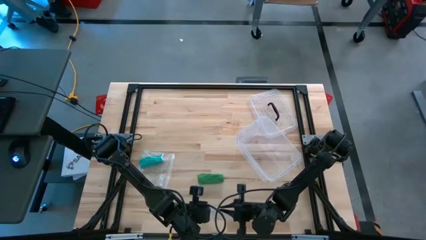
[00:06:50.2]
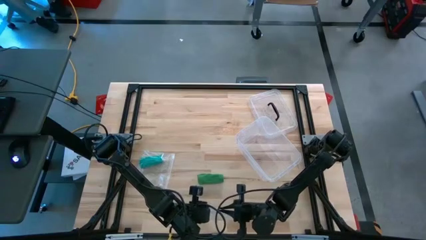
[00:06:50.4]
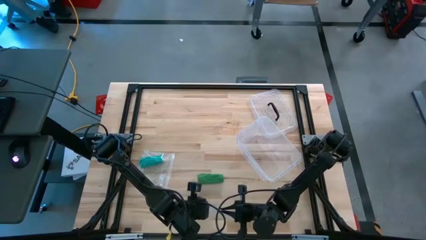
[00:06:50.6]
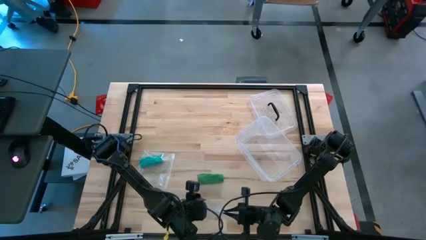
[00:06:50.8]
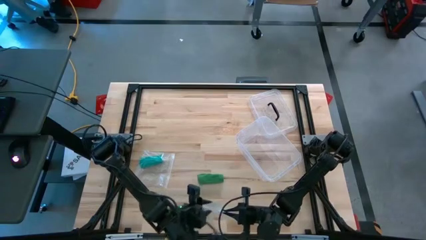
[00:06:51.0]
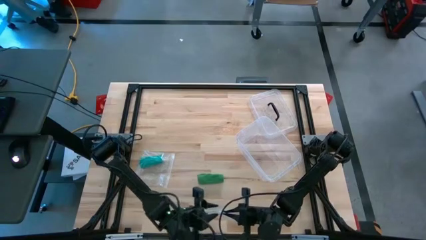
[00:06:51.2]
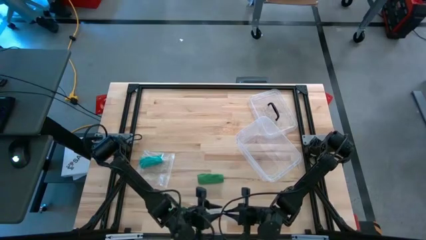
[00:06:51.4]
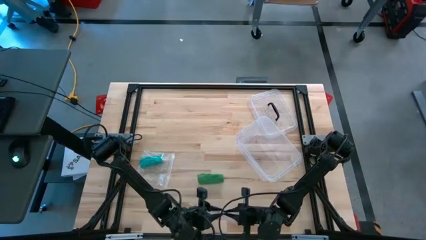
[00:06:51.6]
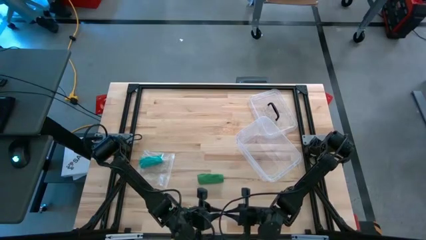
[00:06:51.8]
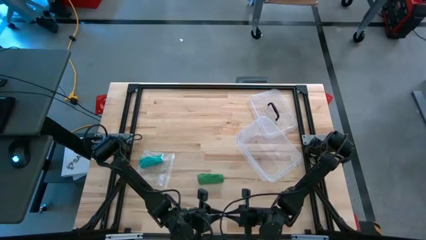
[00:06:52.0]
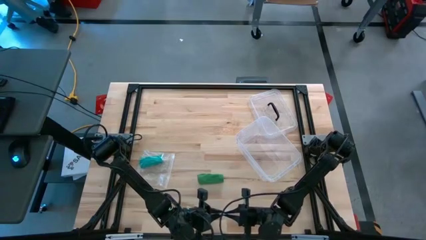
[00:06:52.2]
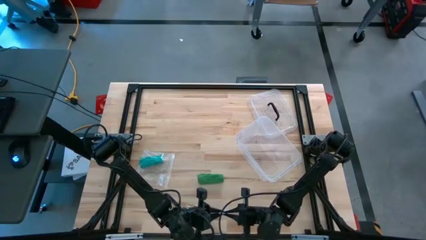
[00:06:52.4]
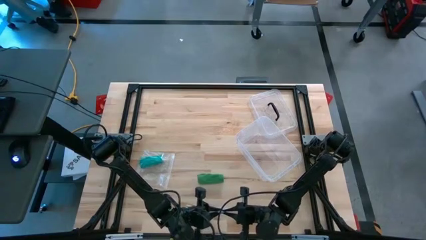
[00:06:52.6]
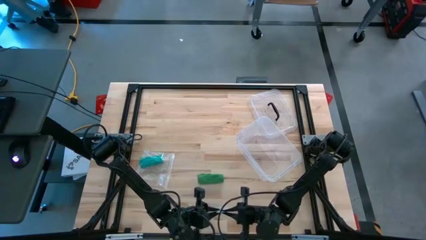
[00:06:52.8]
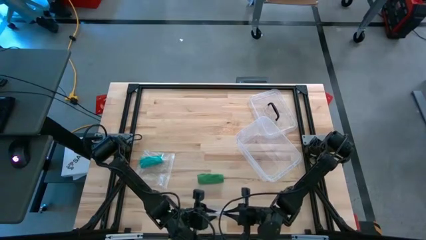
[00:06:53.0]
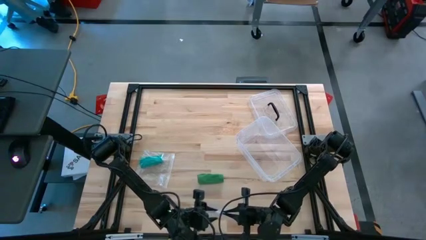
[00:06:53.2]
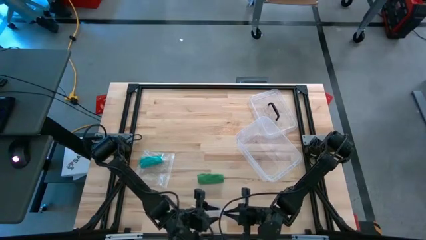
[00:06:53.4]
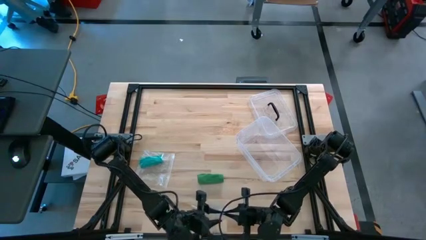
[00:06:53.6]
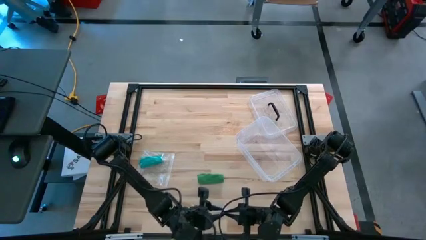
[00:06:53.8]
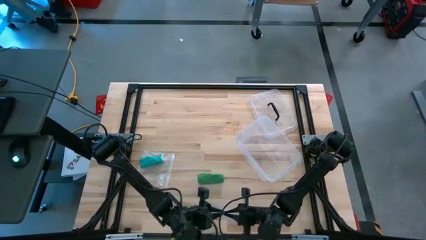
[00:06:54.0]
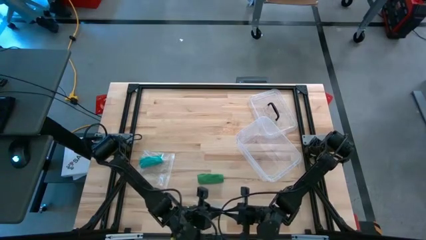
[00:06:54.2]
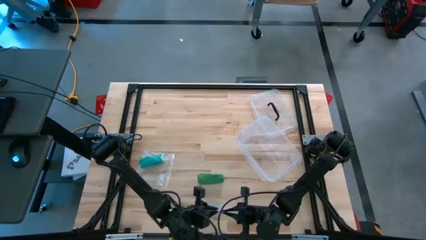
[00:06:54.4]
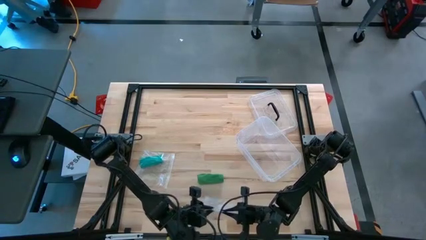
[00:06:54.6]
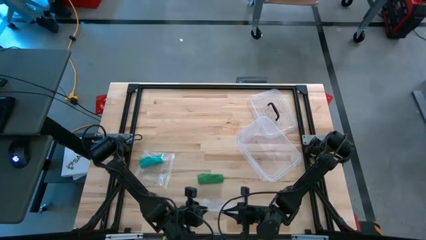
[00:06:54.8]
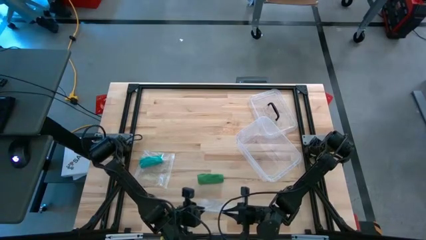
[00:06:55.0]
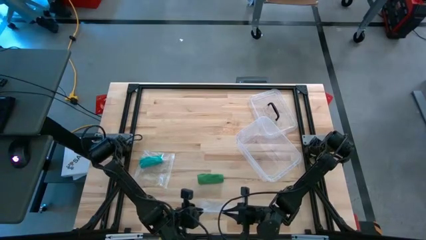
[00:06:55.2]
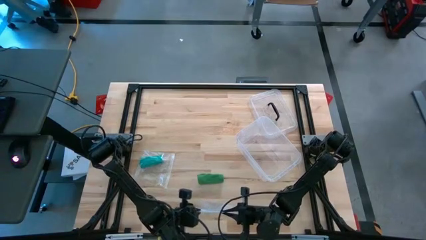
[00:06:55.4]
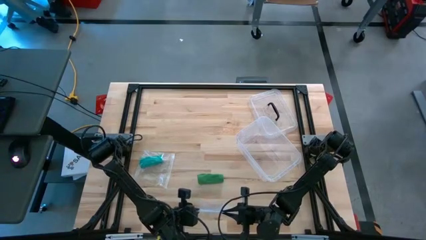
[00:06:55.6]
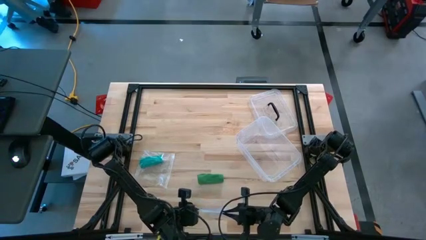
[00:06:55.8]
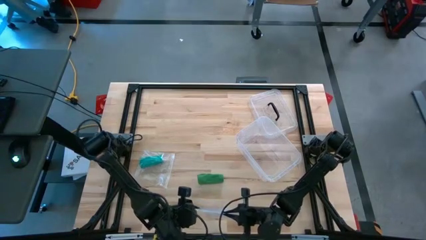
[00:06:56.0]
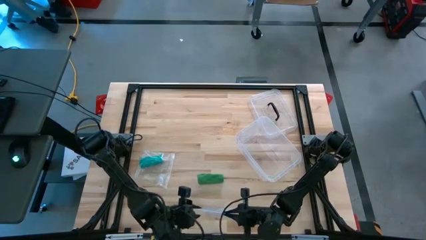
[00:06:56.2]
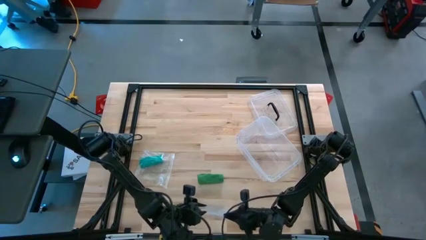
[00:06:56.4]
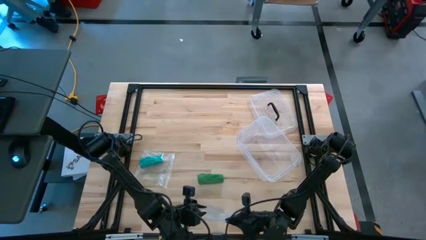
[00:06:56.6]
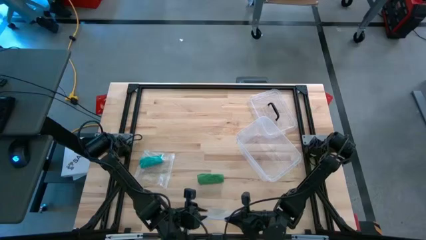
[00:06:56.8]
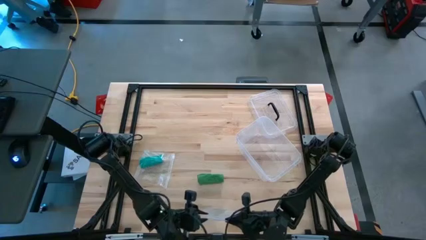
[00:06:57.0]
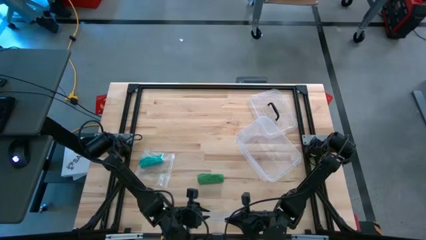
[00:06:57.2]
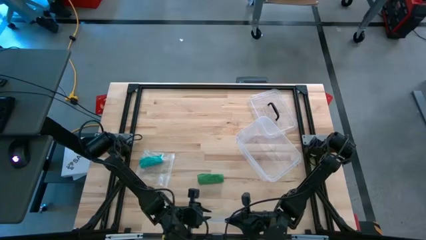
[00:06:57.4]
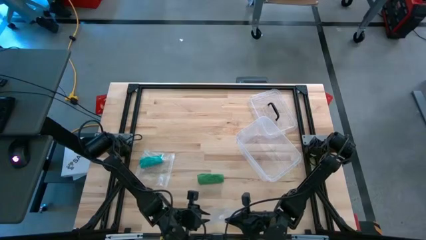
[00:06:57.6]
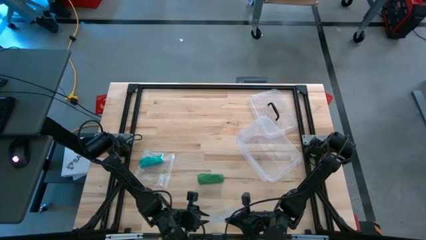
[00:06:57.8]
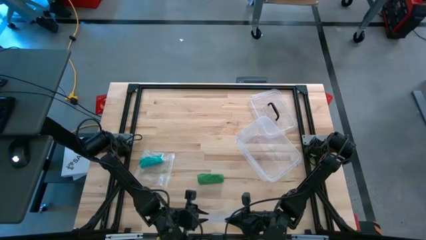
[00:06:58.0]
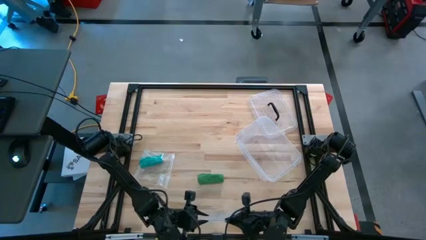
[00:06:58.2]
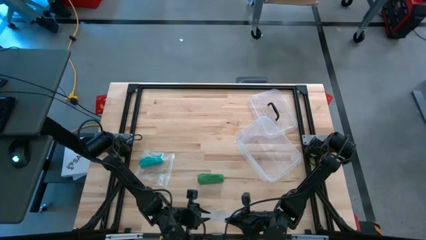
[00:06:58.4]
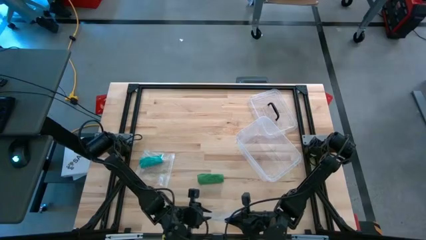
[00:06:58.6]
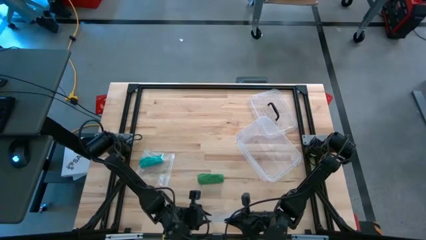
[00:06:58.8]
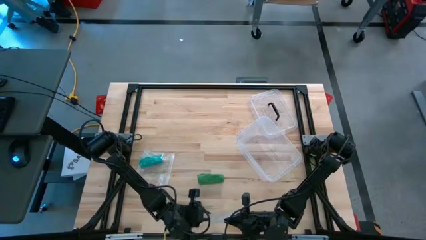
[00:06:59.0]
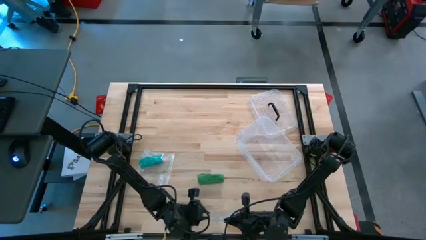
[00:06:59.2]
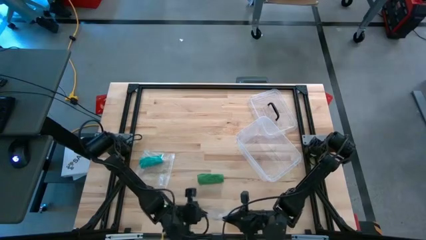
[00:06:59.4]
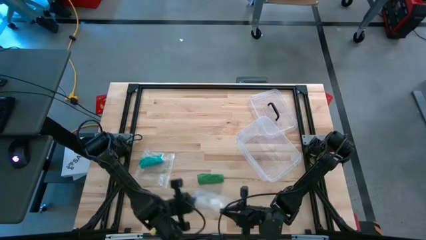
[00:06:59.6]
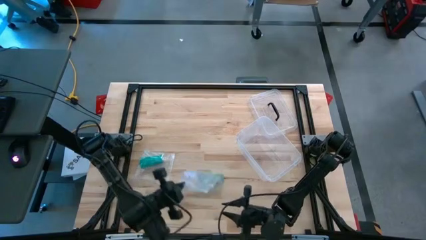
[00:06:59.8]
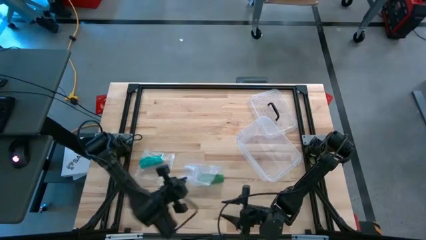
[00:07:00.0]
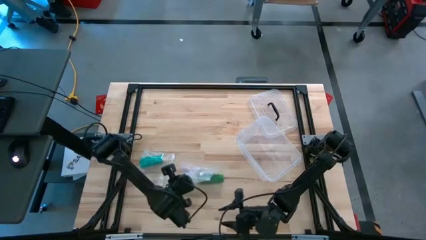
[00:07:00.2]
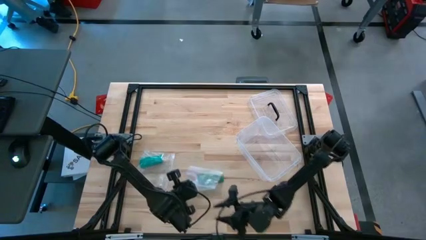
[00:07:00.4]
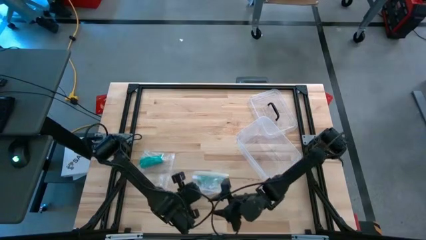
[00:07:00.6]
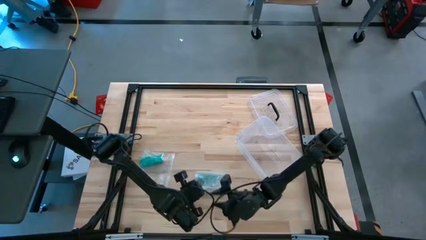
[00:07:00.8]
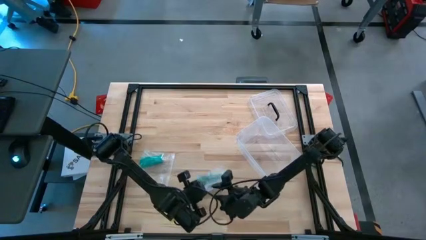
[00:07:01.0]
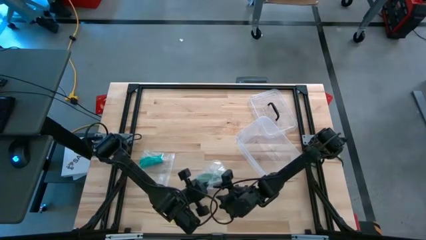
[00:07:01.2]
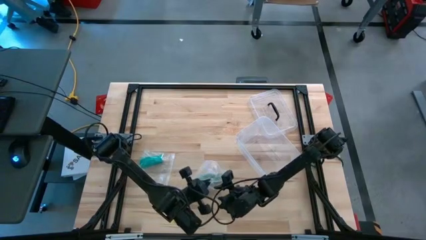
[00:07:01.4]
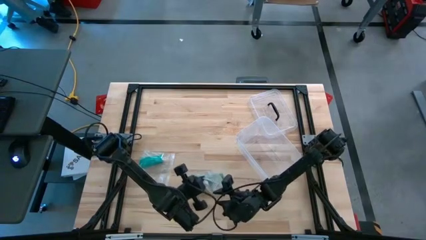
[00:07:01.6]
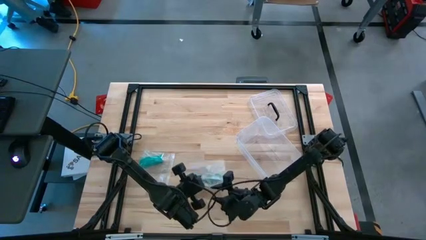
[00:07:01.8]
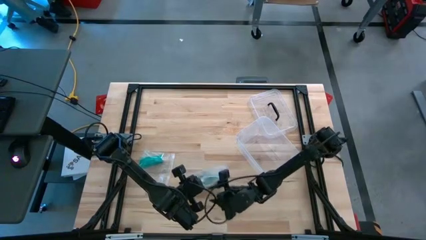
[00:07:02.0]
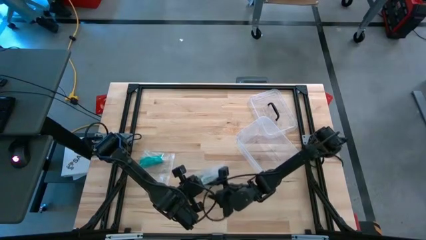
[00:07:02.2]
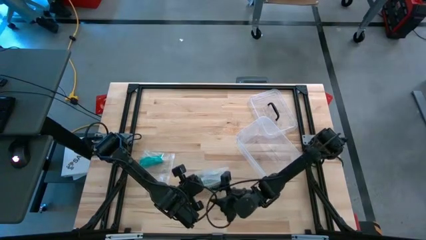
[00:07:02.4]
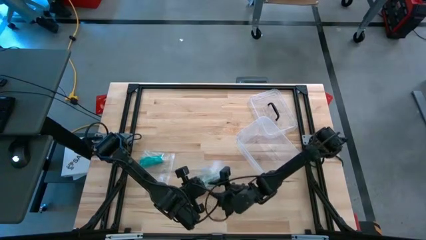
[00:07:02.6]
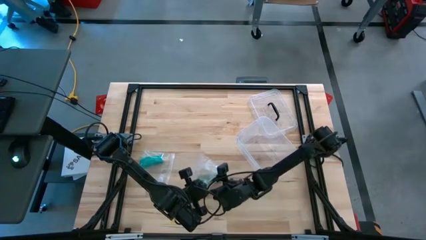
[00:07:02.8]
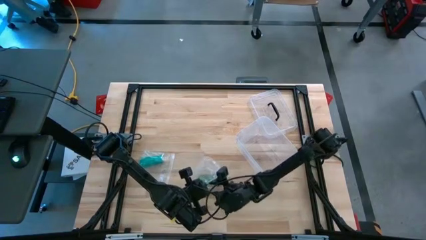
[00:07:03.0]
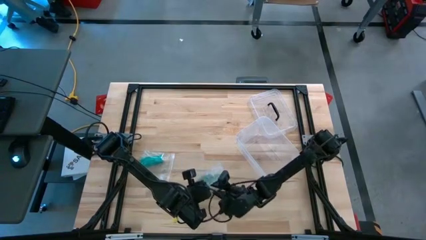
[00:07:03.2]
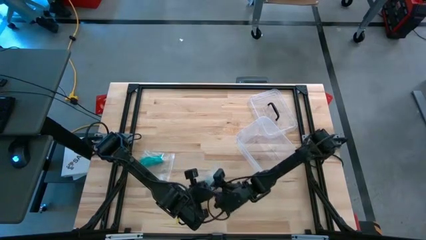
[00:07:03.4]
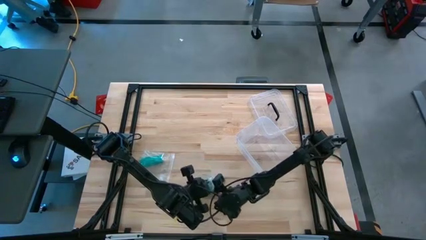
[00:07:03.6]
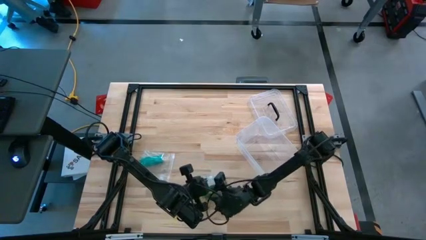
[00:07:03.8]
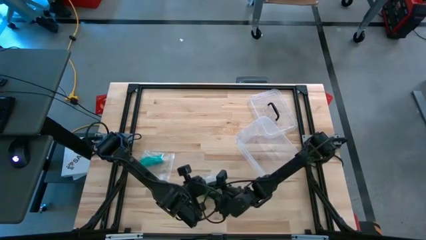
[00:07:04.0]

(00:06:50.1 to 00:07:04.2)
Task: Roll bandage
Open the transparent zip bag

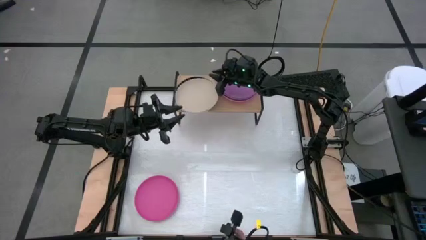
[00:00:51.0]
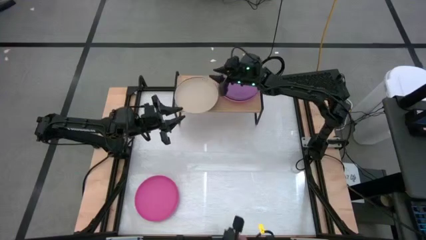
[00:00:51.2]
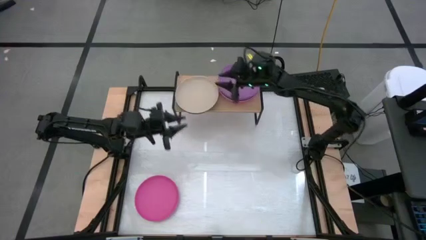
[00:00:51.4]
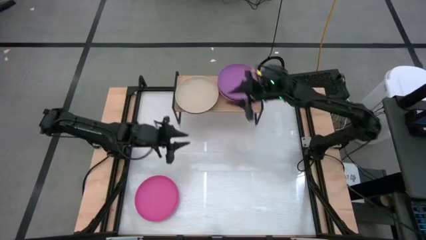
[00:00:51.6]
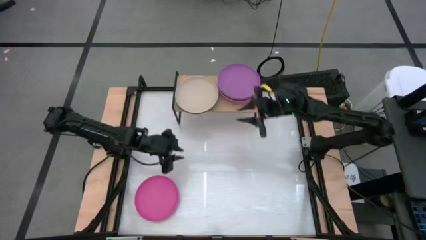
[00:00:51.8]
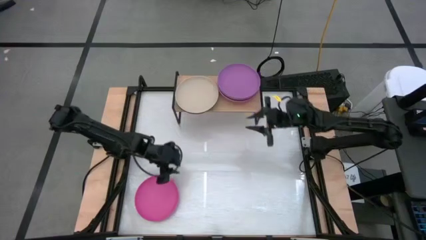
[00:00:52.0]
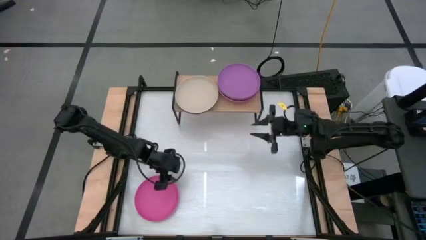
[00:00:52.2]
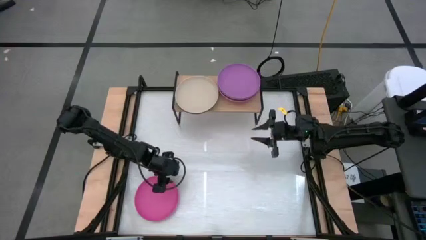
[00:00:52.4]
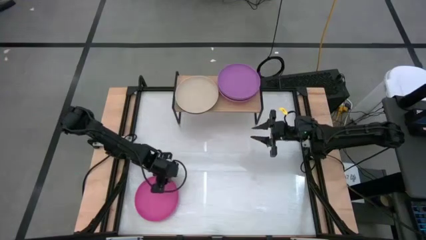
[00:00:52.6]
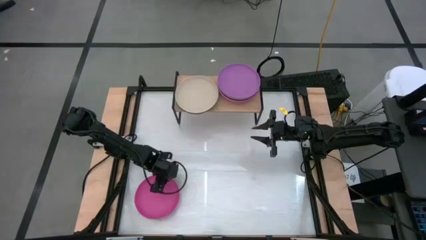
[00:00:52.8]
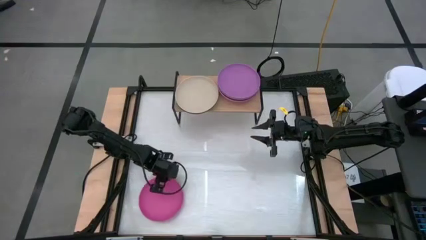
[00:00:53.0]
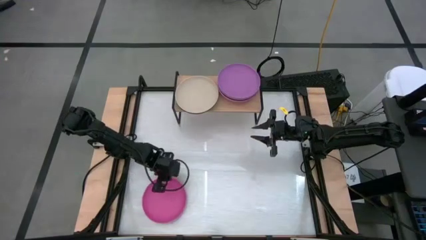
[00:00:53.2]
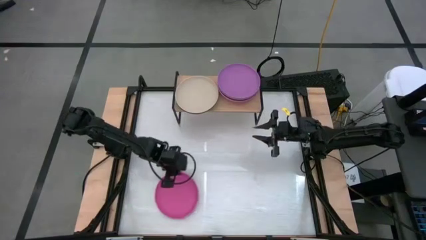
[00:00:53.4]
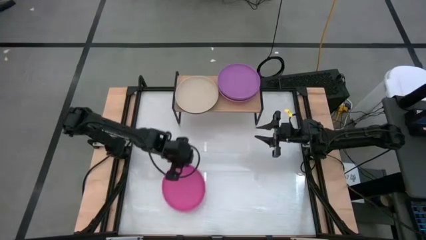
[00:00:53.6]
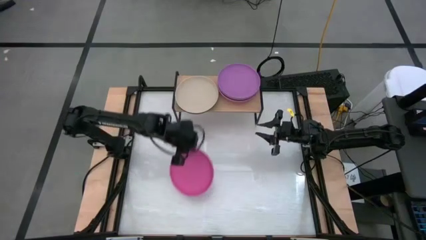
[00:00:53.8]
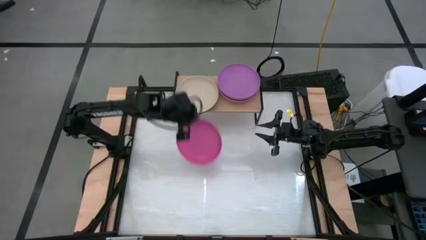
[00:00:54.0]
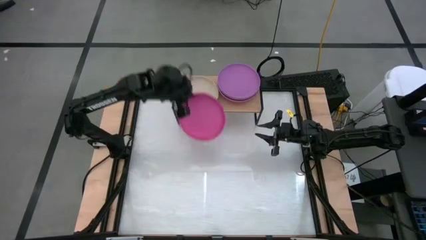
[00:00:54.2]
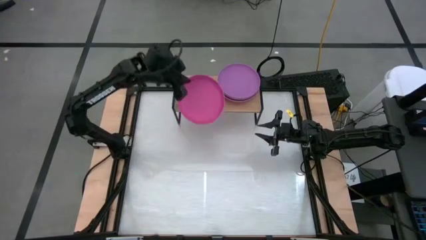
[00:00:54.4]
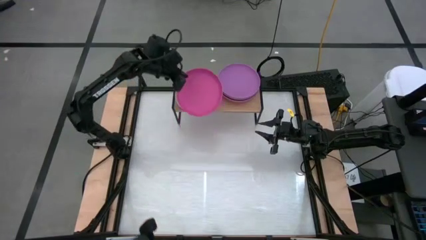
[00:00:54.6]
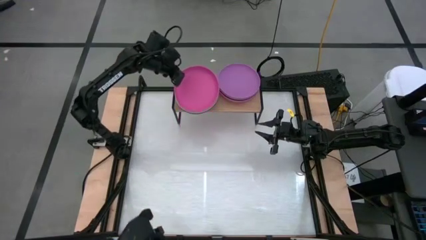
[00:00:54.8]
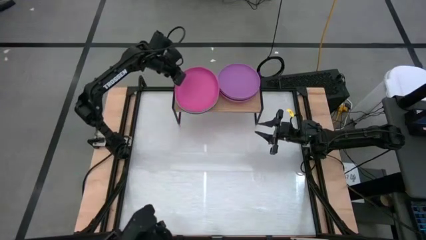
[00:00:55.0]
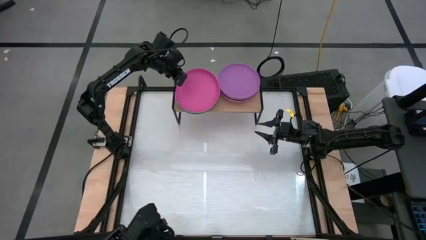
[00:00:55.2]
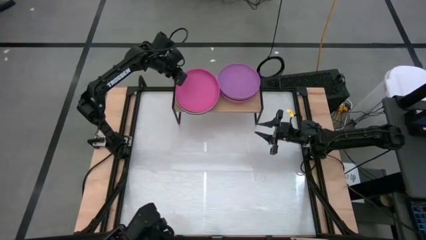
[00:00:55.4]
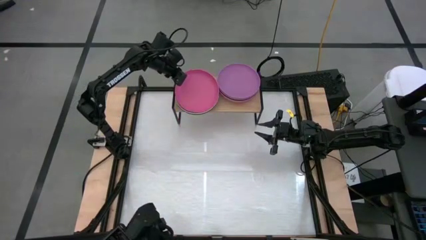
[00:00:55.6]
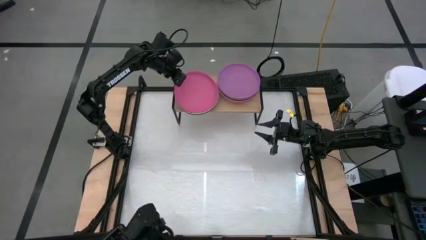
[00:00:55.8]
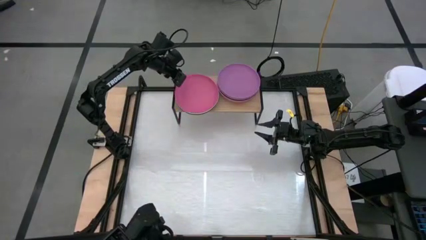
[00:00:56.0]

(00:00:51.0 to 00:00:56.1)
Task: Place and stack plates onto a shelf
Stack the pink plate on top of the gray plate on the shelf
